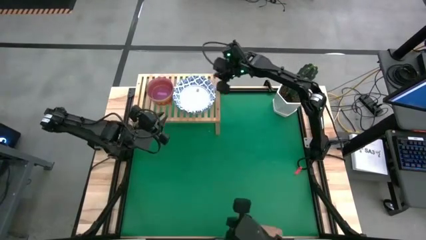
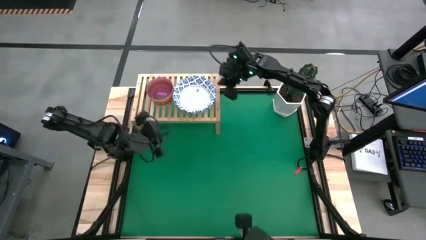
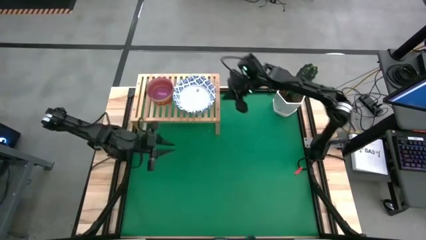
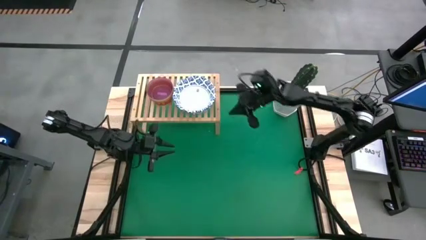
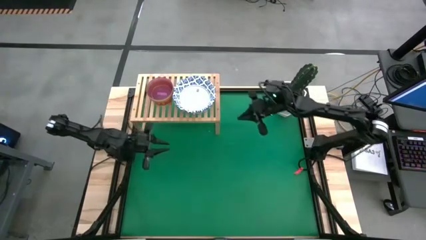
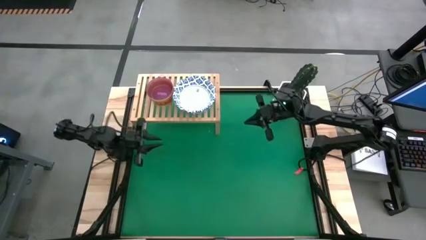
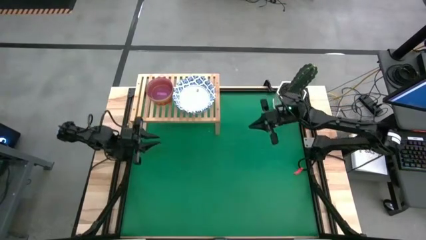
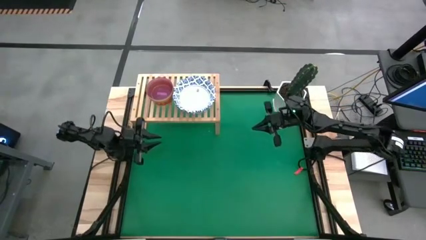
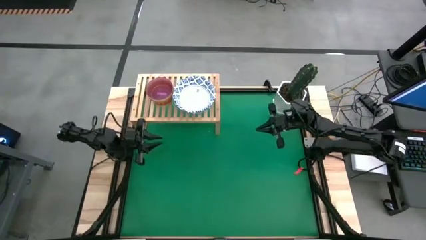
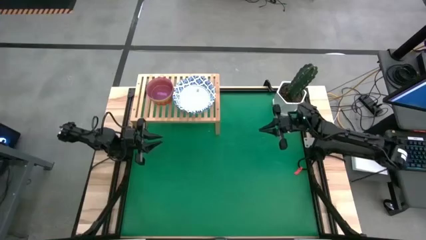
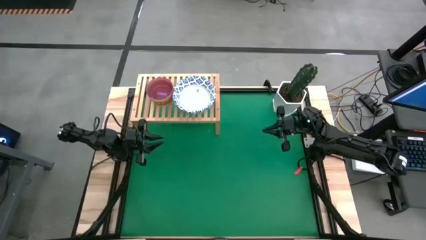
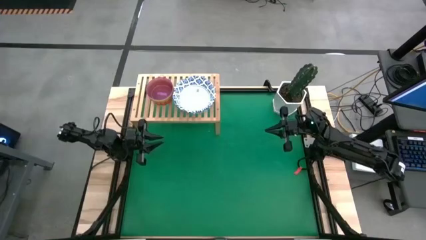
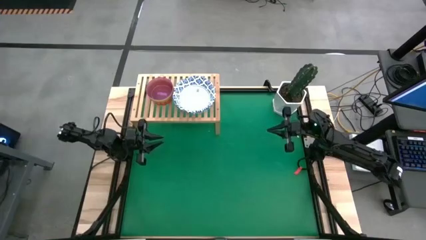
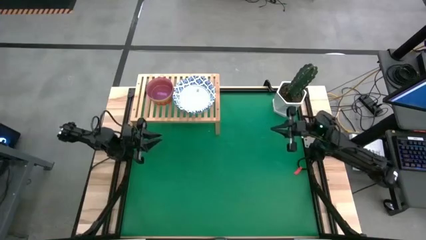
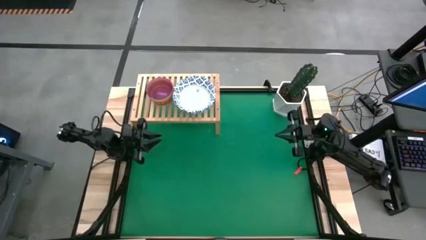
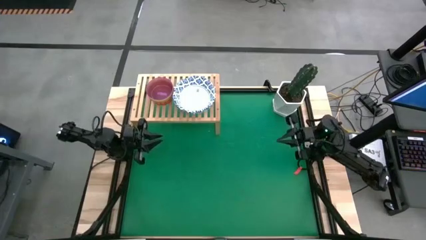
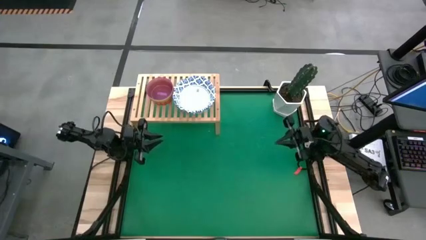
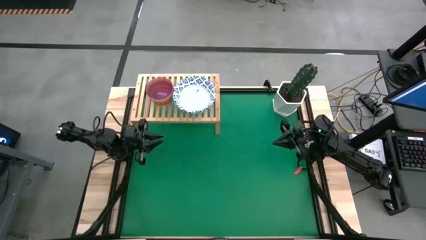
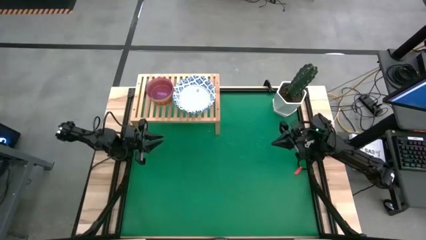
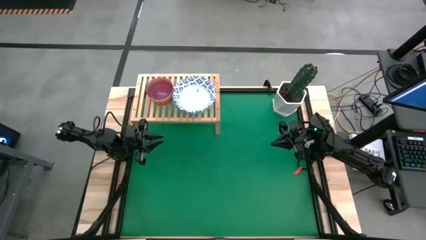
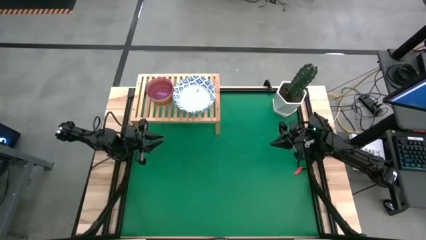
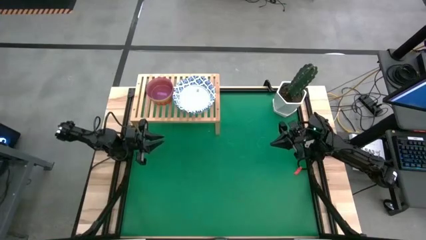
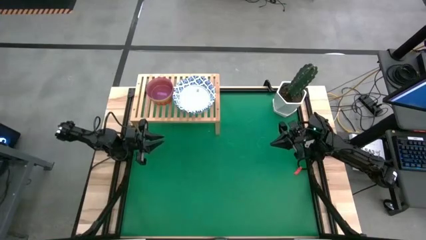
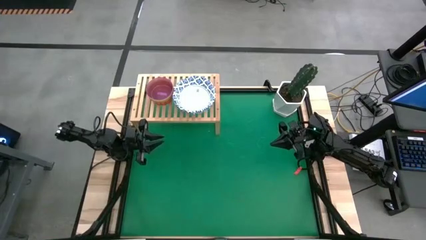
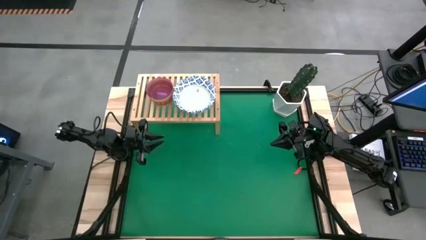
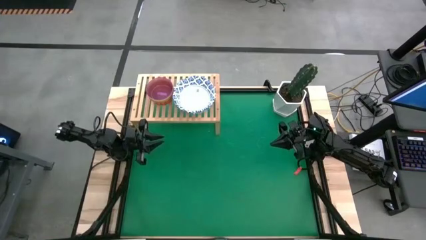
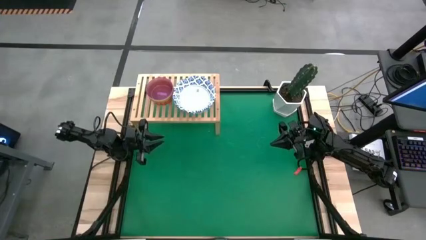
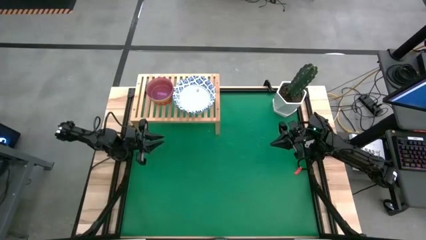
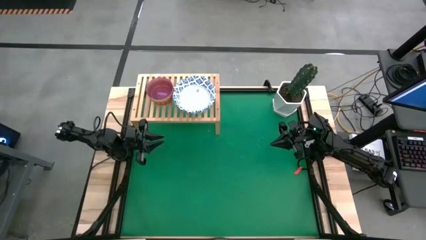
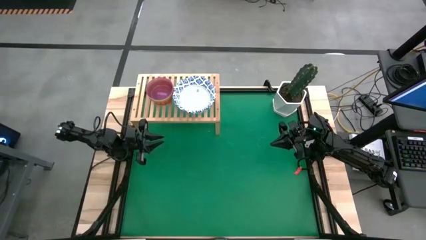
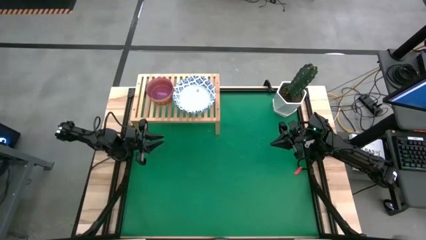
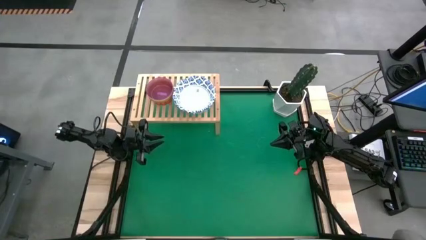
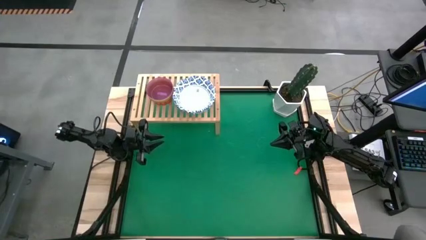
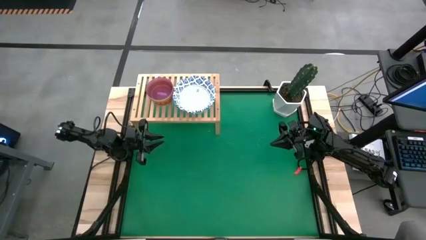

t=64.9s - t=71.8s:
Task: Place and stack bowls onto a shelf
Return to Home Position

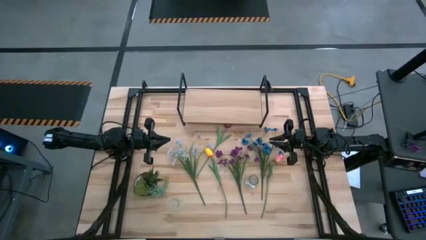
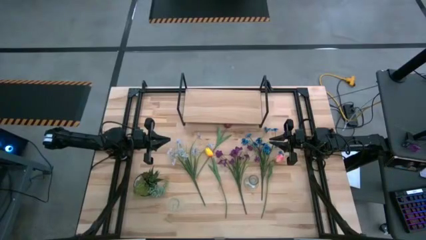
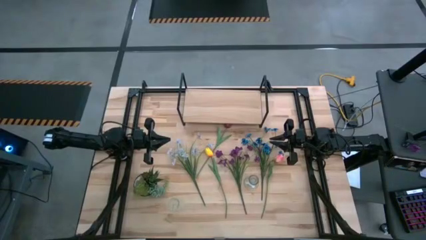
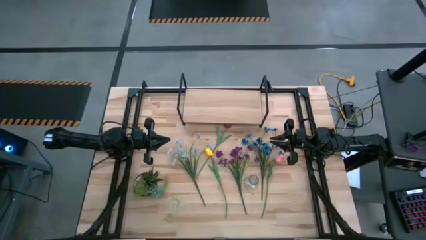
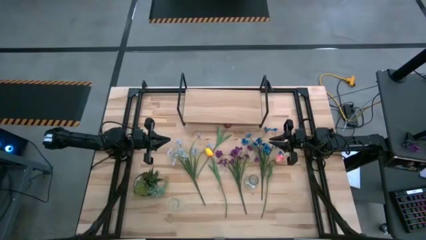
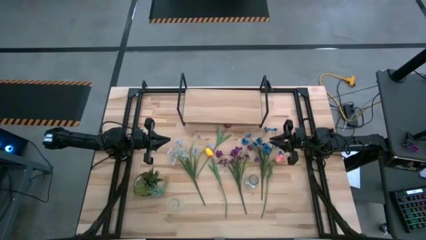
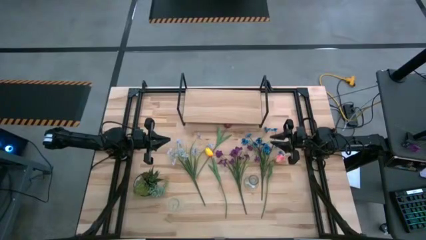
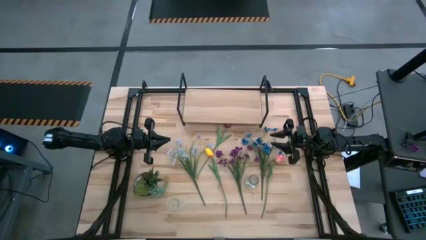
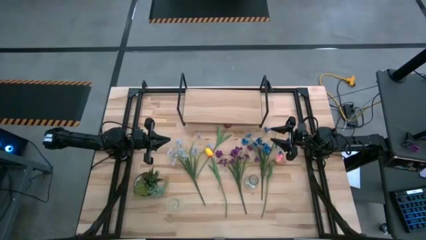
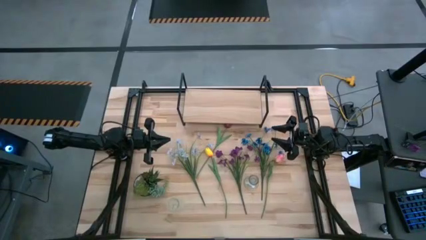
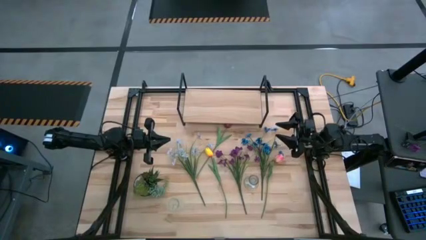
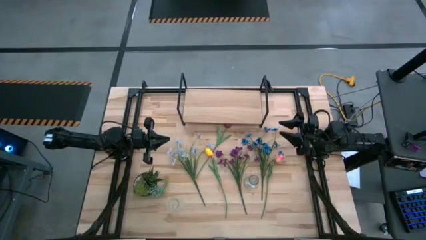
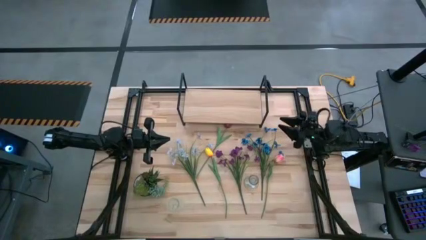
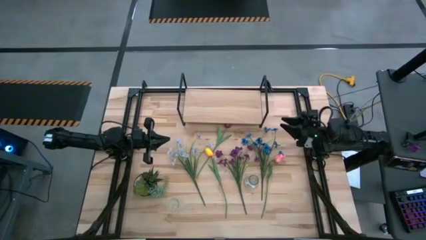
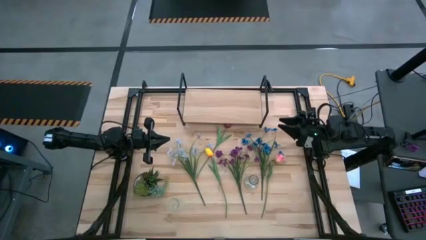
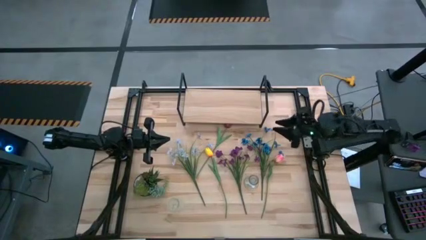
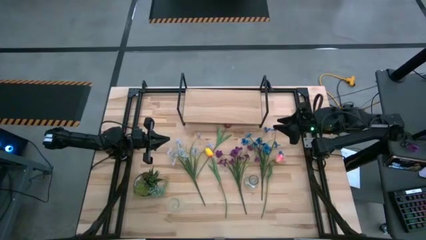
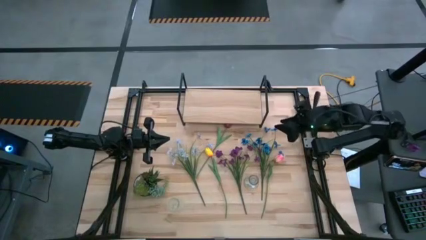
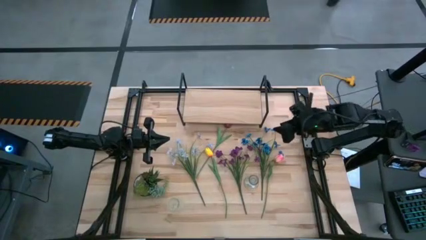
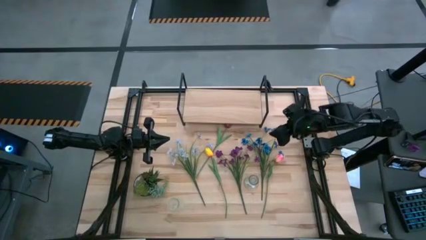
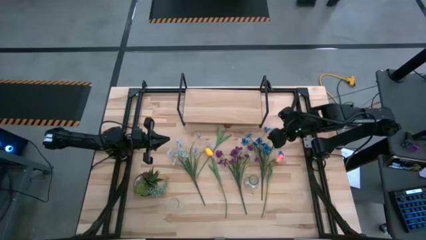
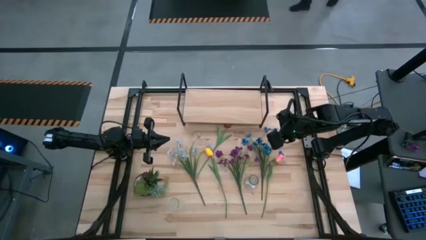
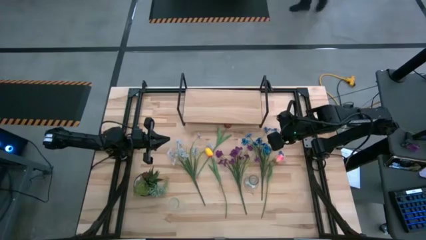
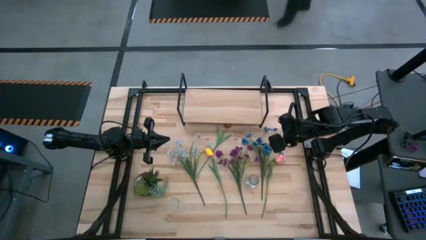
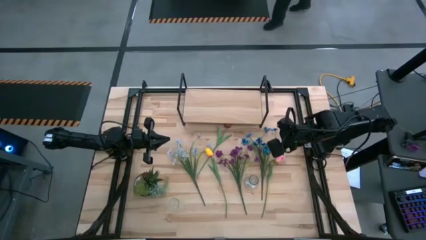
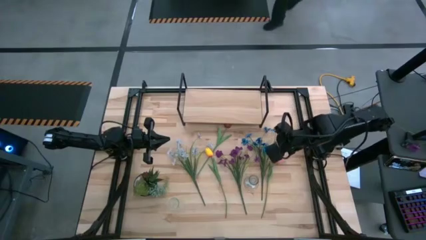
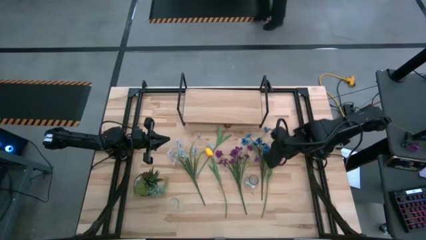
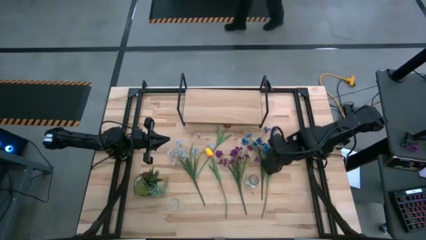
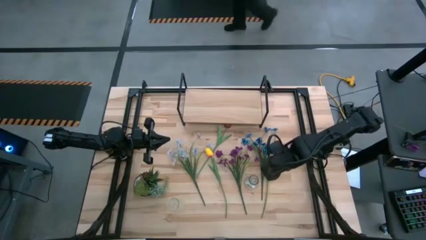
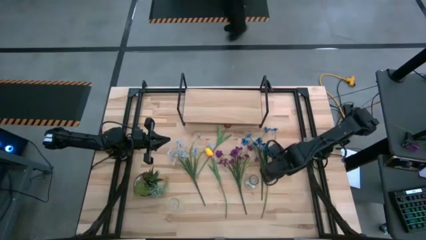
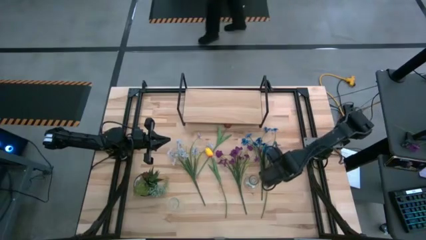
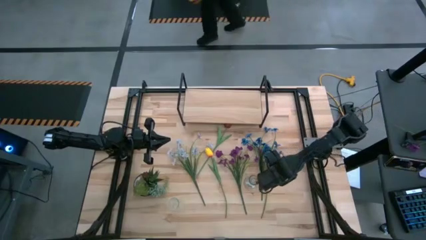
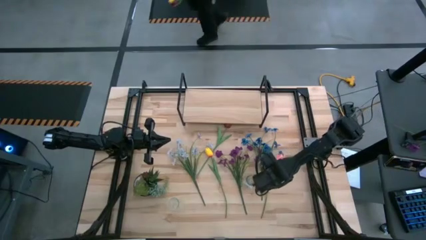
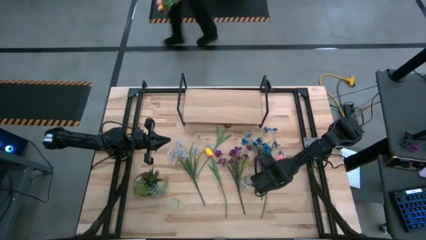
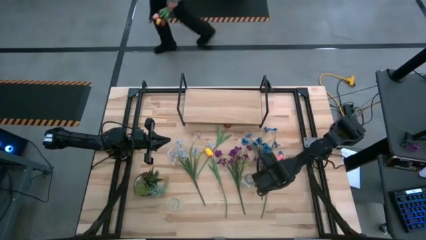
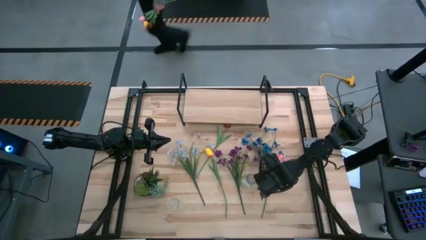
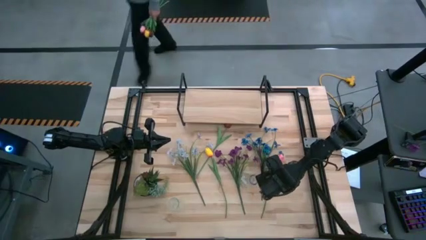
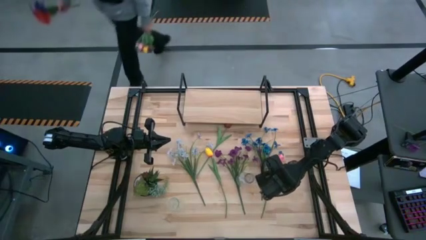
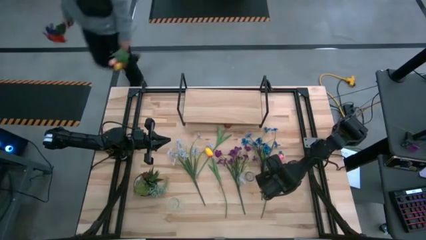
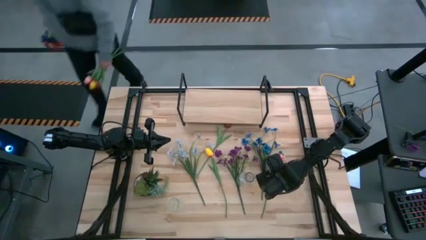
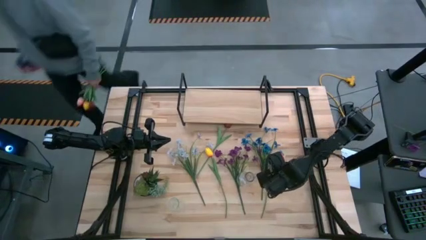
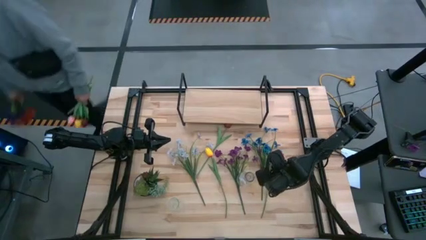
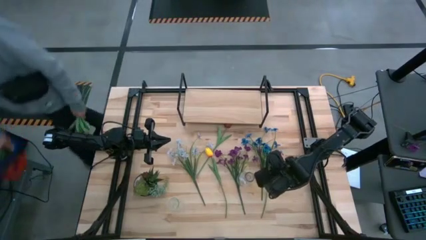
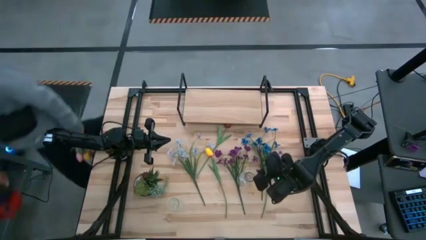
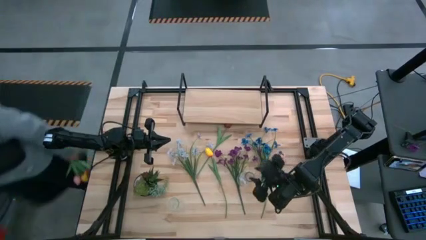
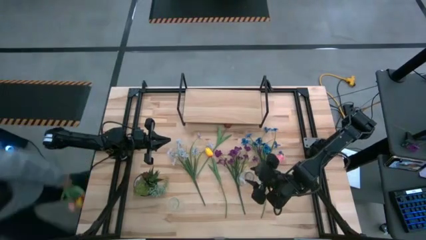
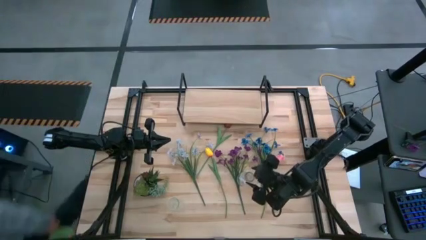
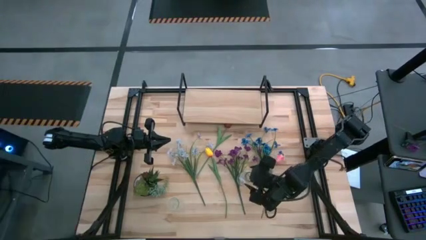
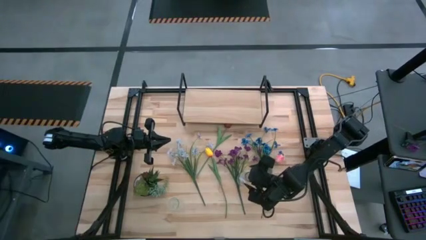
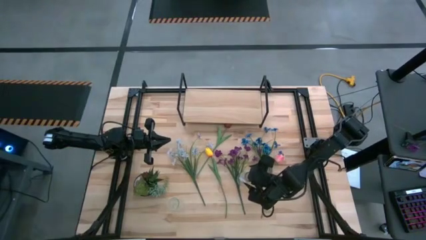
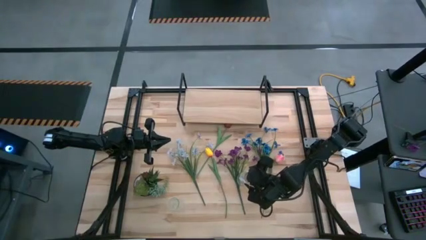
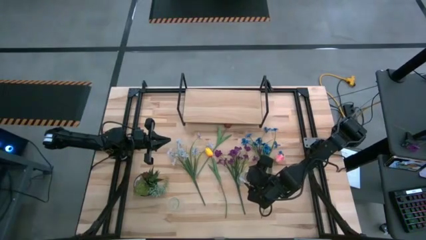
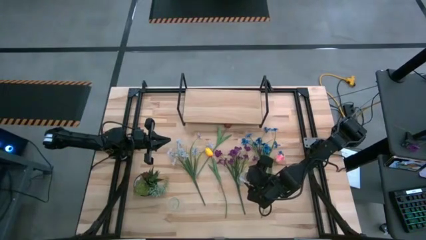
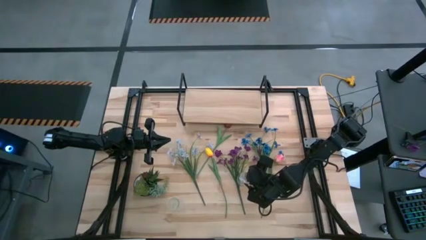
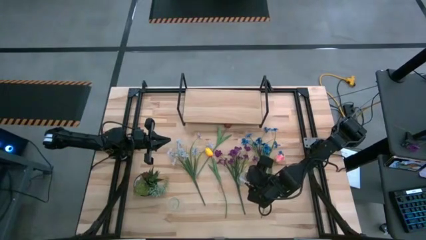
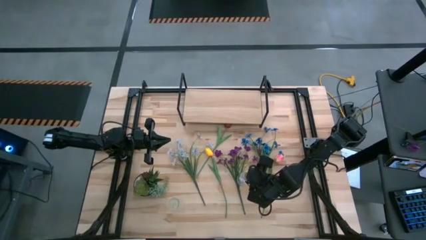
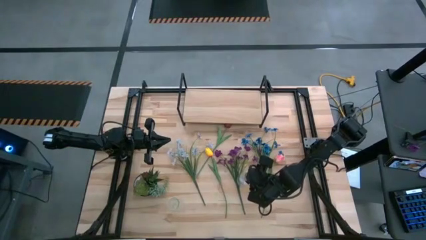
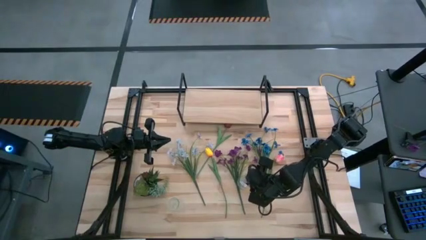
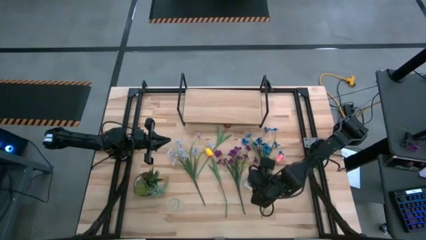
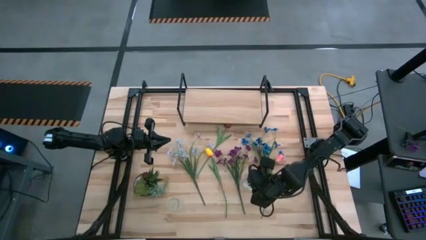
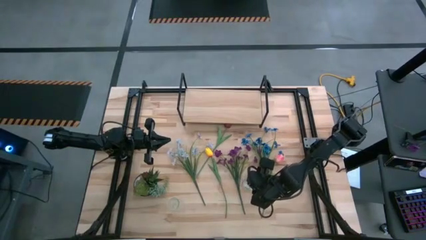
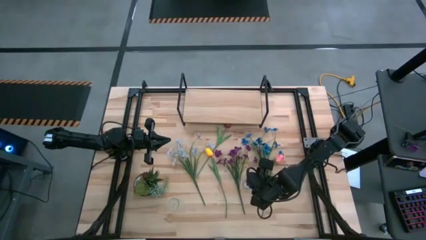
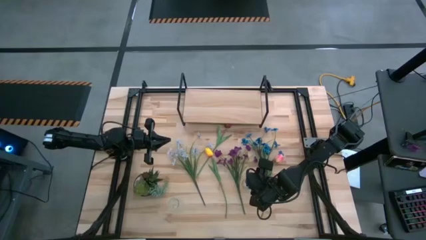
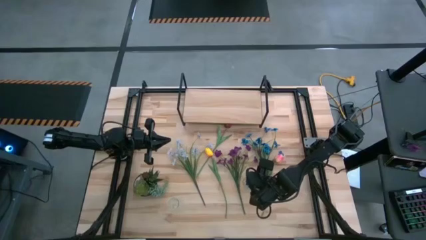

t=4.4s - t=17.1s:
Task: Pick and place flowers into a vace then onto a shelf
Prepare the right transparent vase
